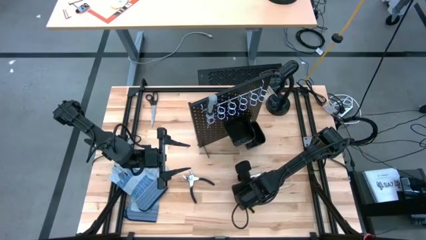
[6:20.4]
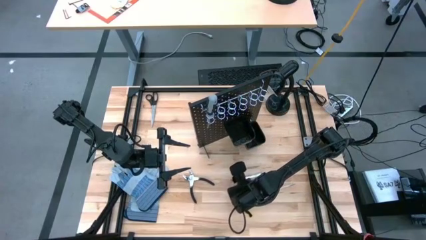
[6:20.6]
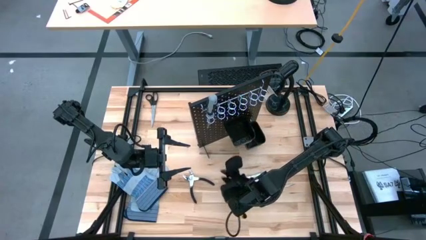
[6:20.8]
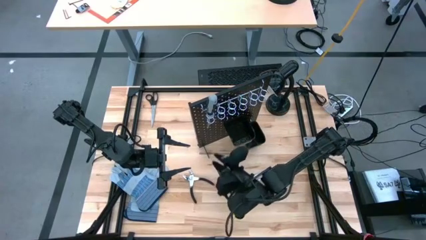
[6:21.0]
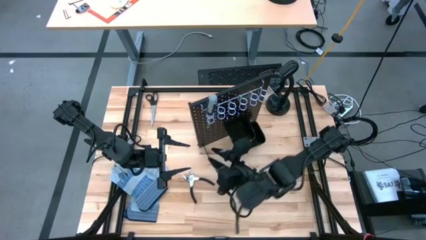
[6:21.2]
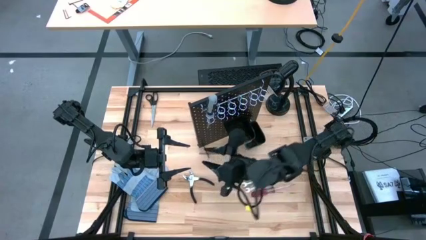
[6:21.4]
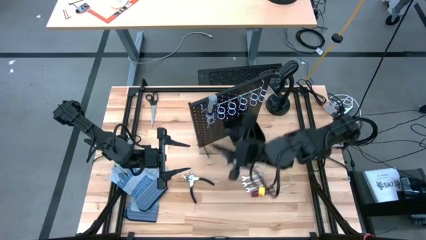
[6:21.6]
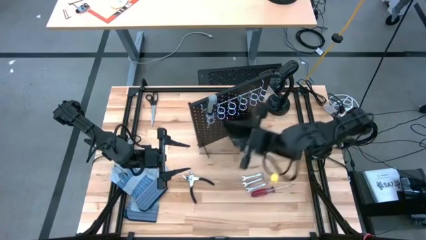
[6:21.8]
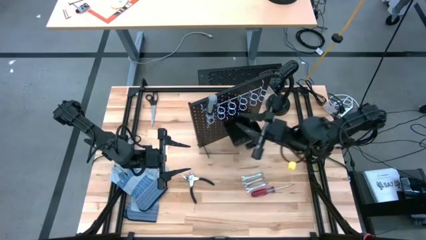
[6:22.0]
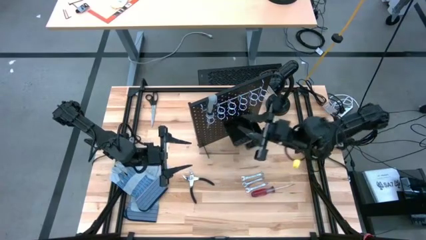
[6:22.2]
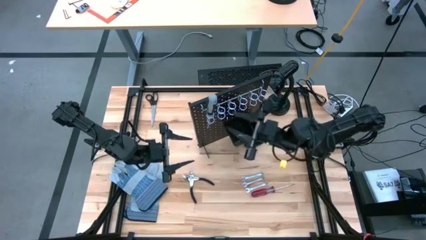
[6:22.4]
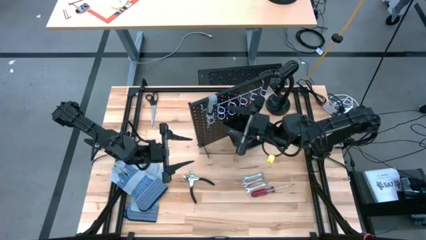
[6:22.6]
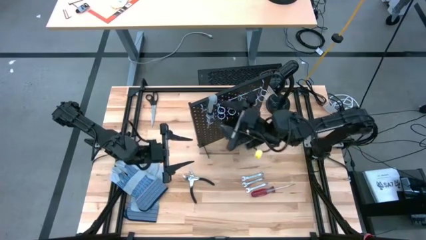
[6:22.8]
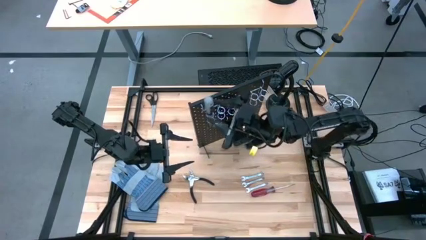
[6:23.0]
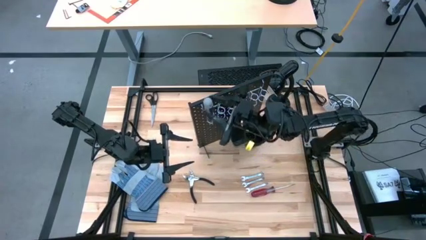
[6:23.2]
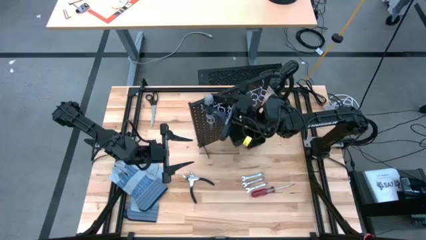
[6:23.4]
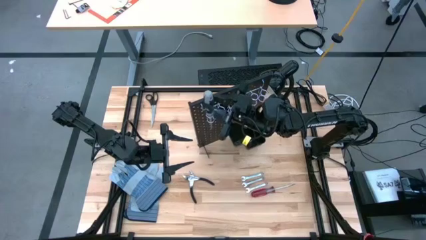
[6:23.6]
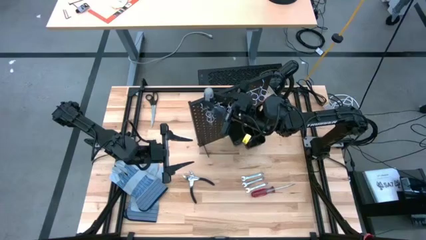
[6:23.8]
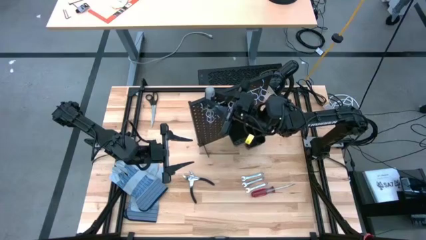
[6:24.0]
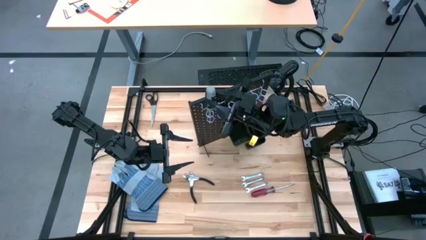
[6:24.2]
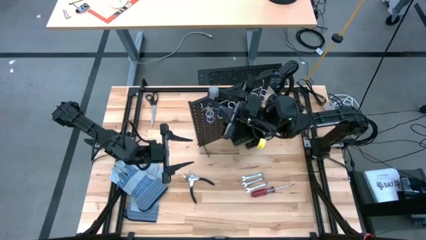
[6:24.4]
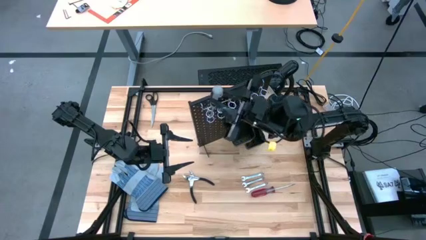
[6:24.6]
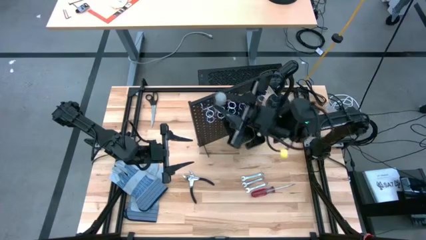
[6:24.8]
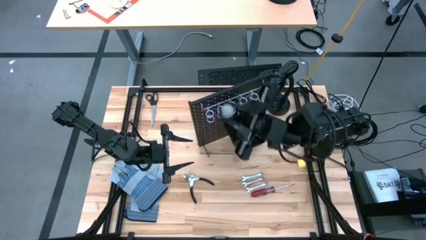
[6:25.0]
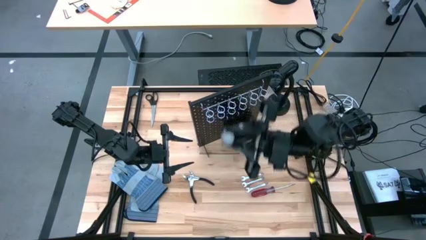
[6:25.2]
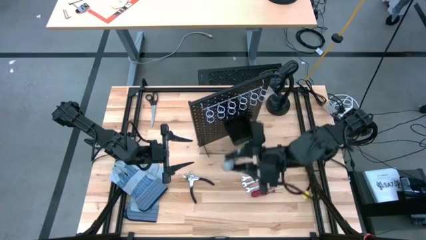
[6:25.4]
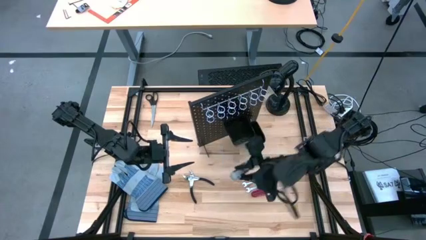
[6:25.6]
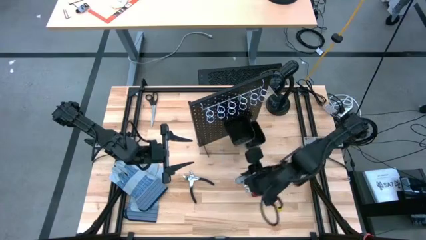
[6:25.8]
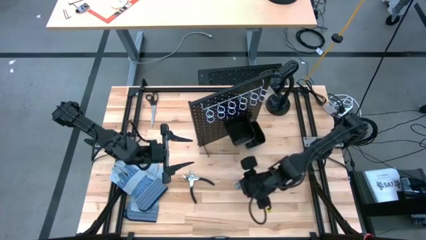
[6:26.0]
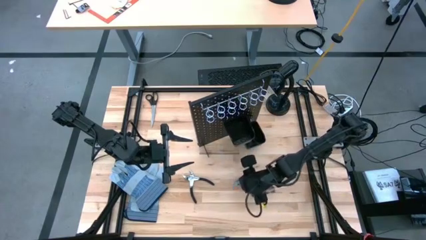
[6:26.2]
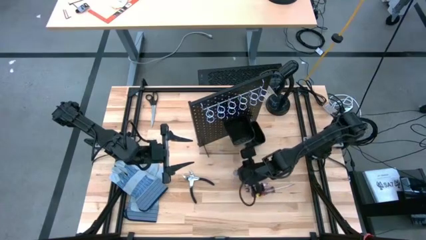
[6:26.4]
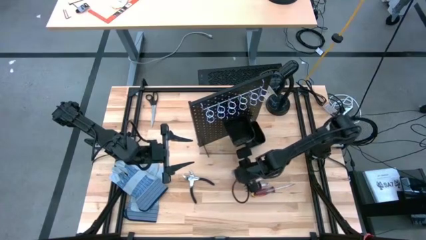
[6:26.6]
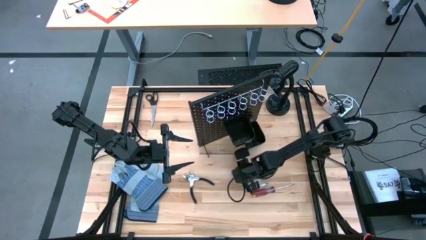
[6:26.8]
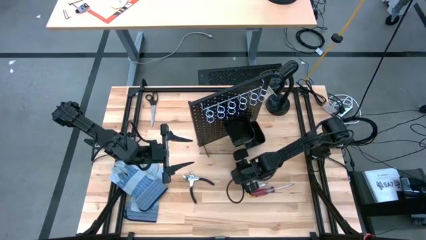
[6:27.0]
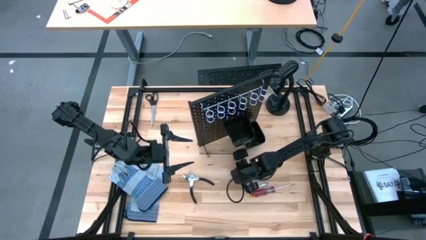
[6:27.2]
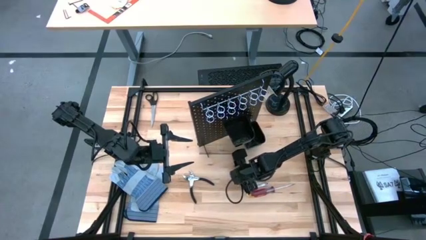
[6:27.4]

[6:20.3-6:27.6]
Task: Hang tools onto peg board
Unhang the gray screwdriver from the black peg board

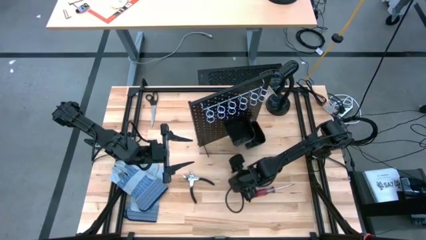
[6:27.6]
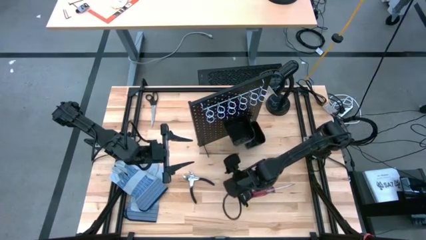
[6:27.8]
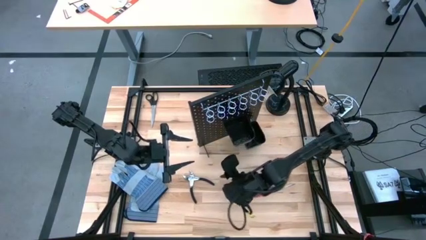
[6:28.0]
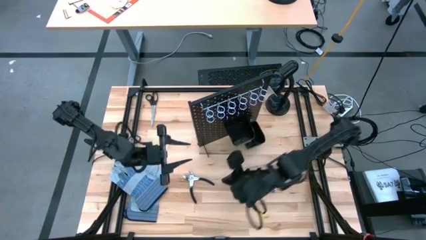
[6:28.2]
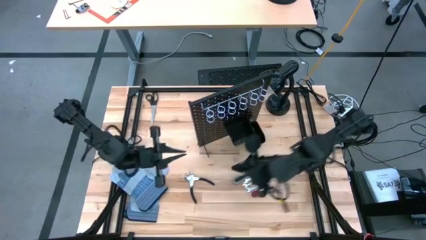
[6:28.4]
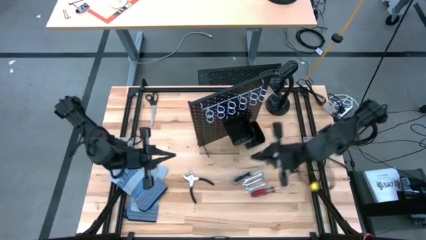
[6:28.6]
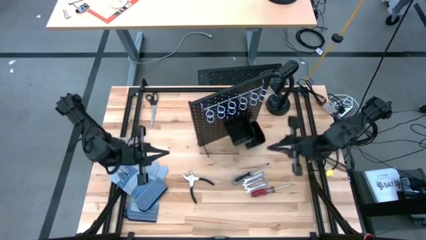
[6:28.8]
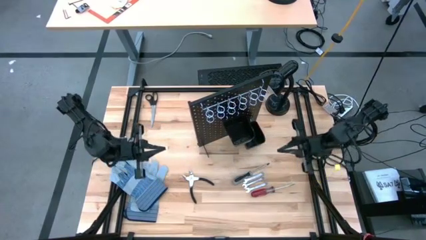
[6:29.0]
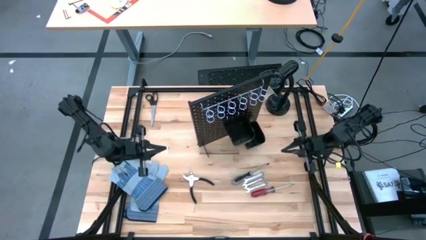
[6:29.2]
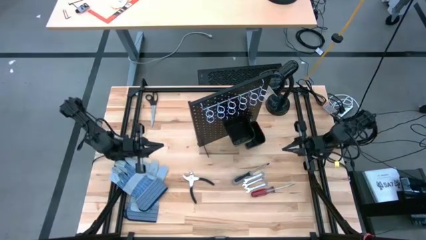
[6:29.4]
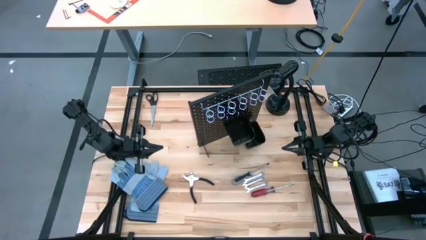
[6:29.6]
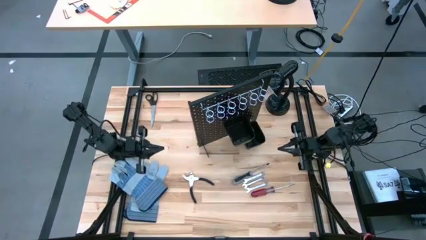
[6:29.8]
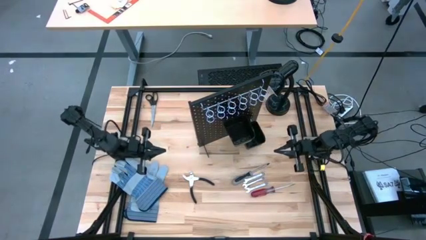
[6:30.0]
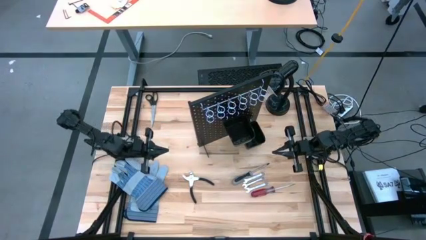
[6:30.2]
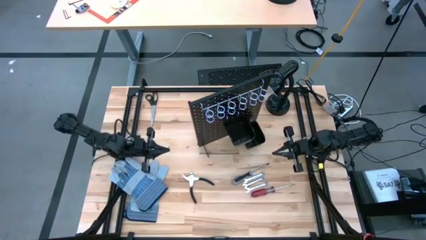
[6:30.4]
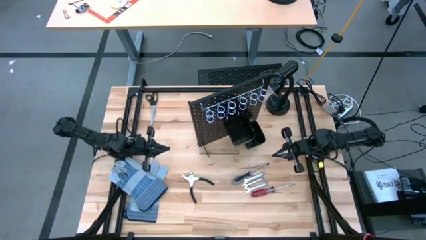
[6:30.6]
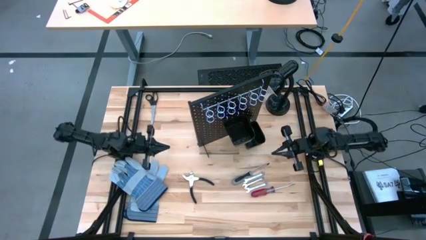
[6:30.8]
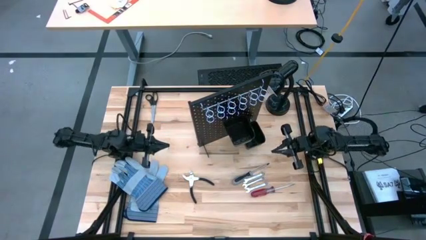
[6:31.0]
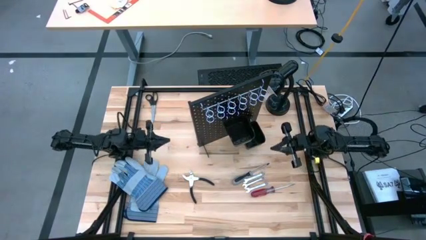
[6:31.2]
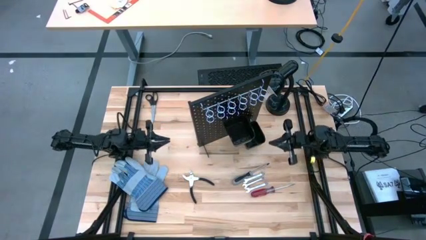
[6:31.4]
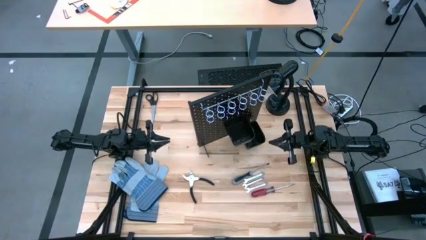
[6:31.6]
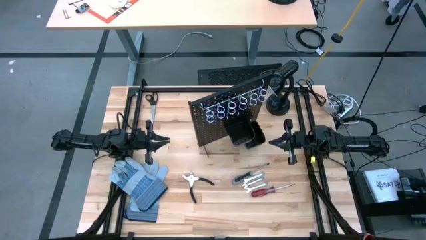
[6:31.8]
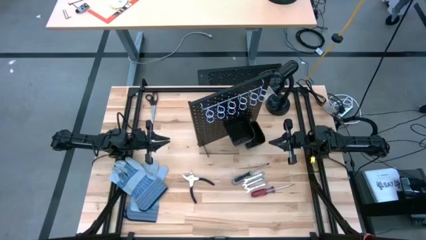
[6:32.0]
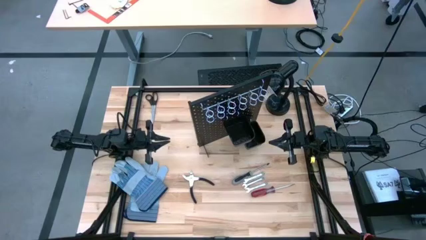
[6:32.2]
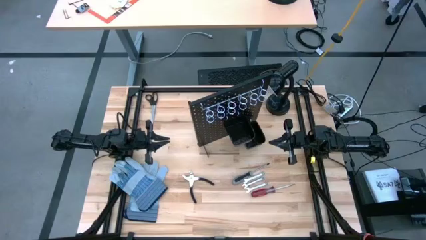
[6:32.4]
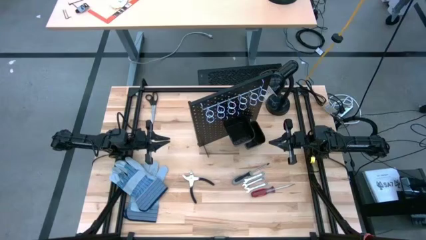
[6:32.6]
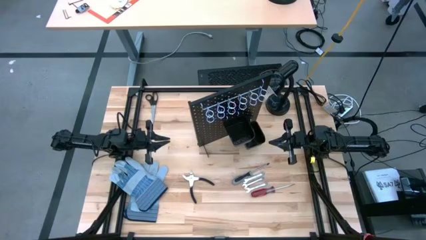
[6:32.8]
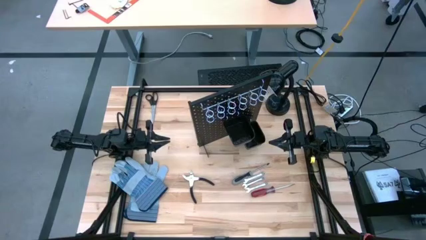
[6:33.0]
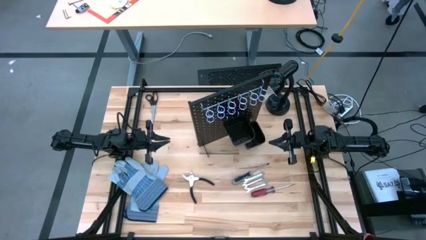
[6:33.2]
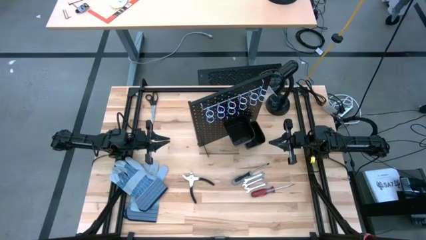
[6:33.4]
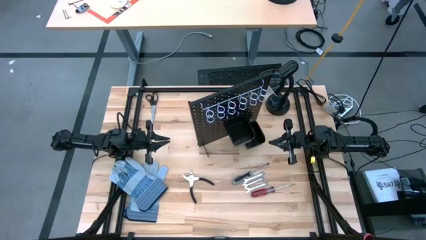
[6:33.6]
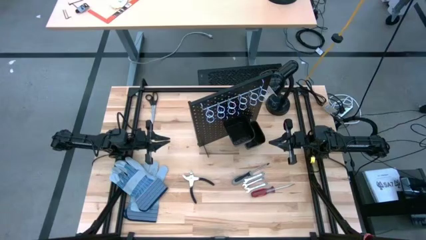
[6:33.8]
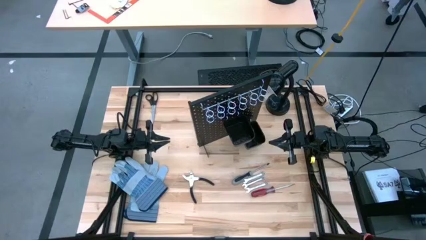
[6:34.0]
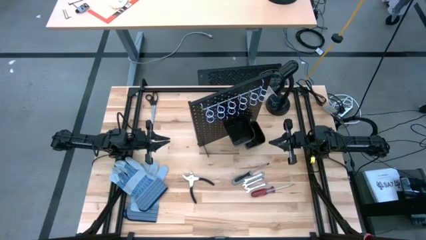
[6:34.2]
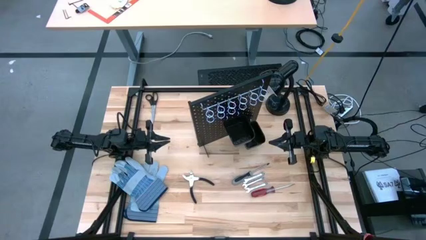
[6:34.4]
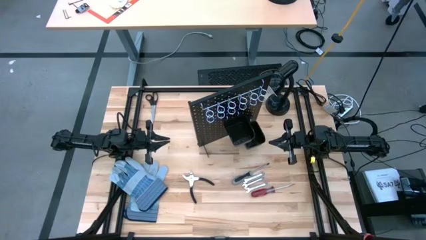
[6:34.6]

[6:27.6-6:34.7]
Return To Home Position
